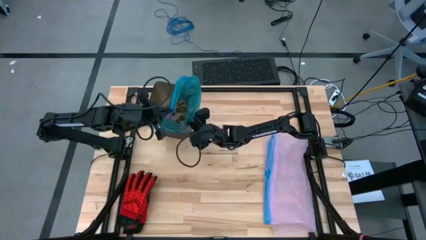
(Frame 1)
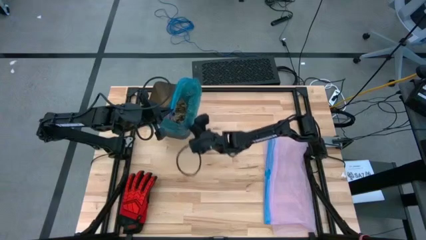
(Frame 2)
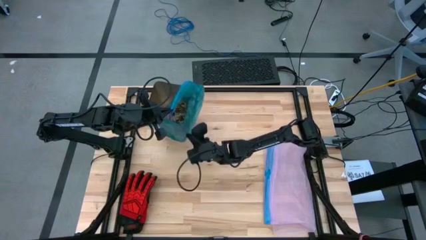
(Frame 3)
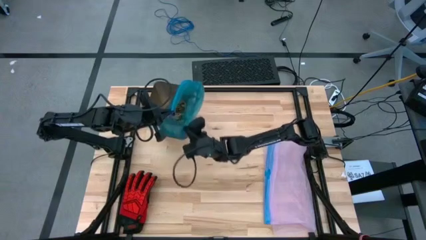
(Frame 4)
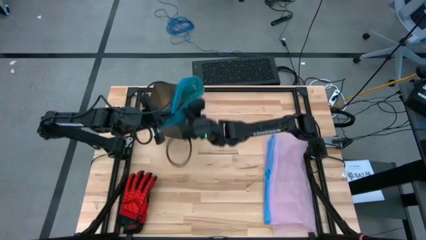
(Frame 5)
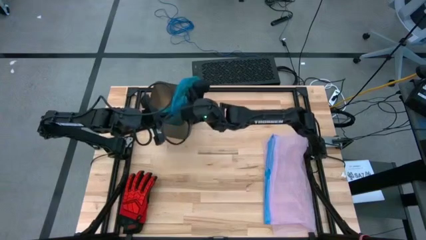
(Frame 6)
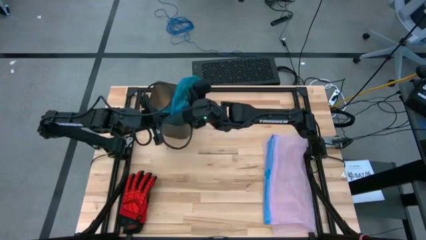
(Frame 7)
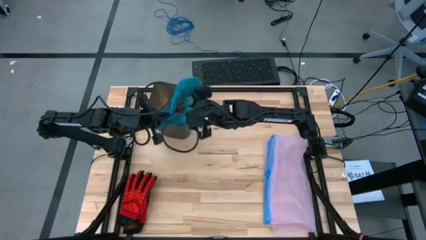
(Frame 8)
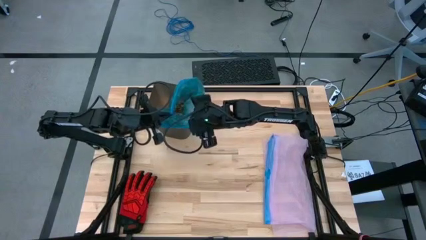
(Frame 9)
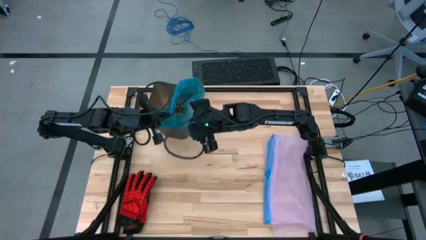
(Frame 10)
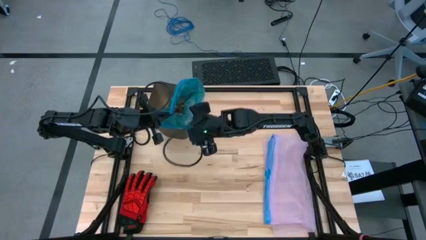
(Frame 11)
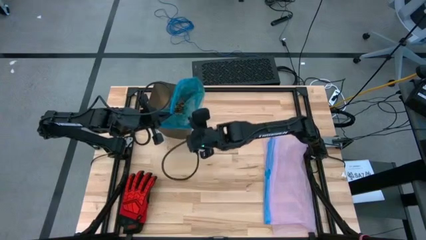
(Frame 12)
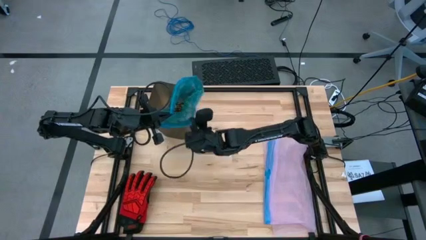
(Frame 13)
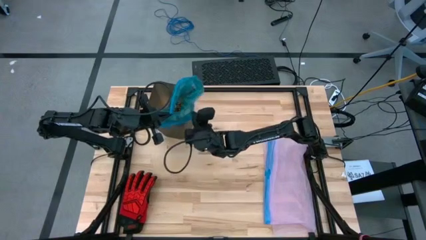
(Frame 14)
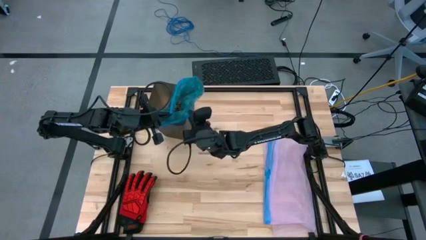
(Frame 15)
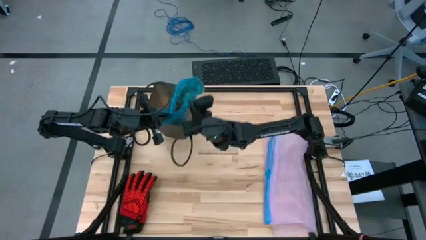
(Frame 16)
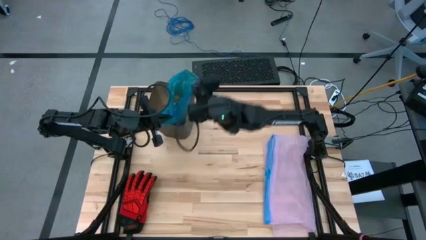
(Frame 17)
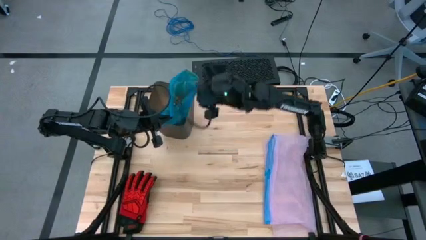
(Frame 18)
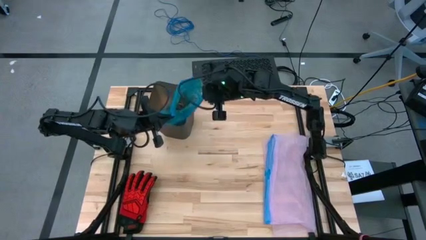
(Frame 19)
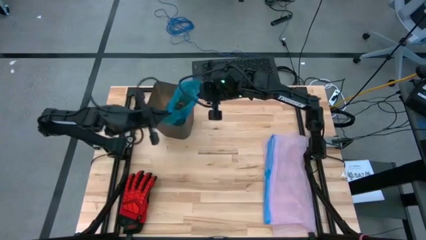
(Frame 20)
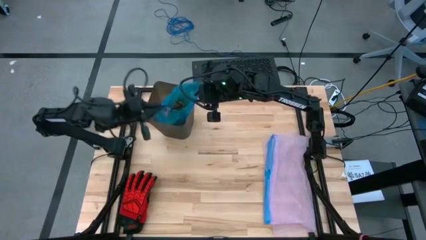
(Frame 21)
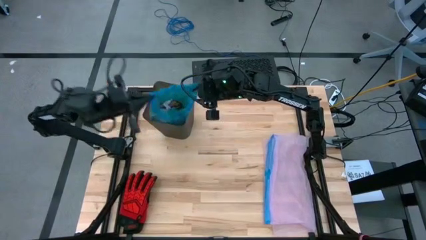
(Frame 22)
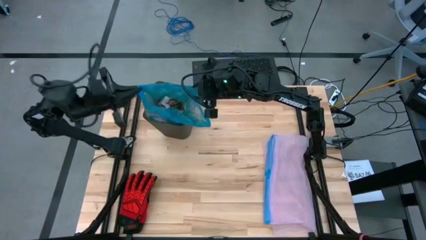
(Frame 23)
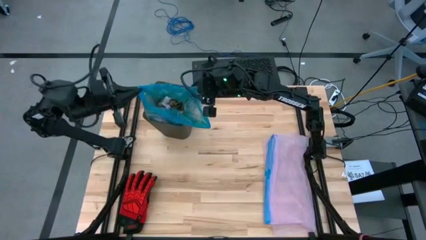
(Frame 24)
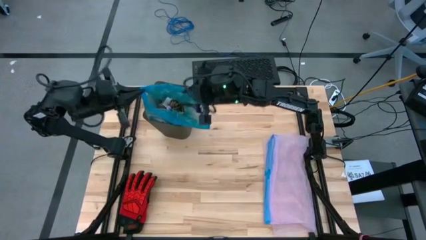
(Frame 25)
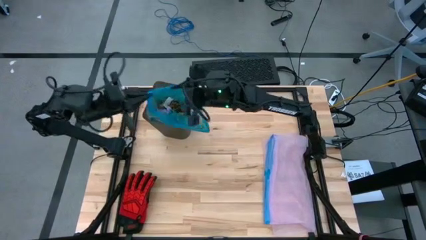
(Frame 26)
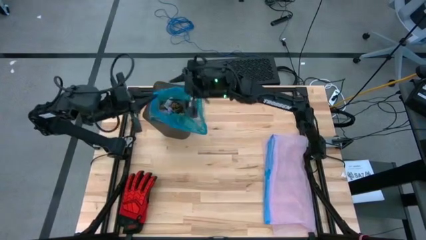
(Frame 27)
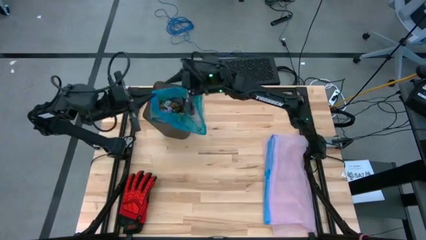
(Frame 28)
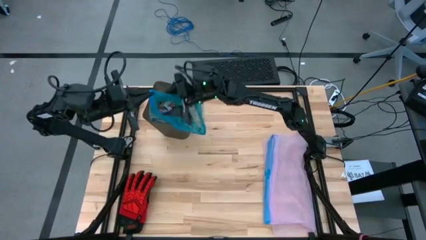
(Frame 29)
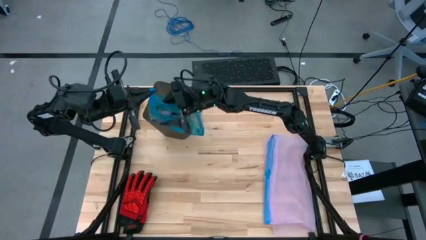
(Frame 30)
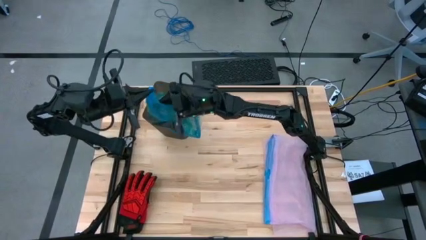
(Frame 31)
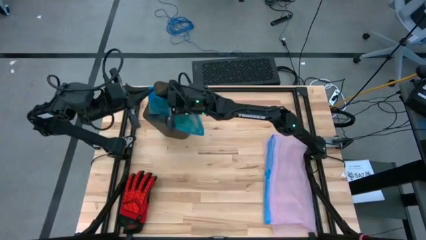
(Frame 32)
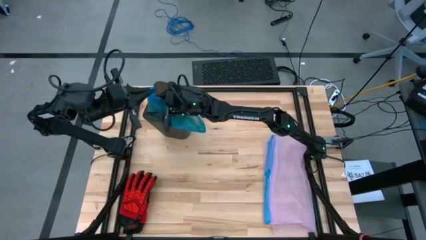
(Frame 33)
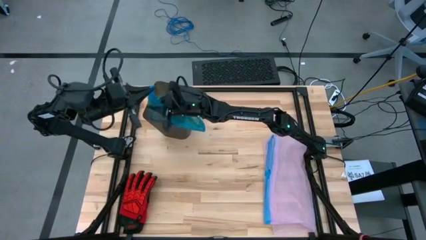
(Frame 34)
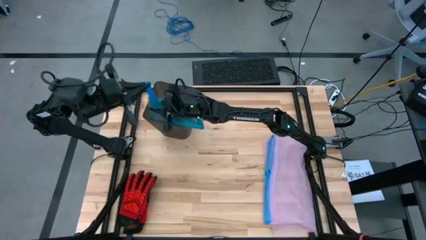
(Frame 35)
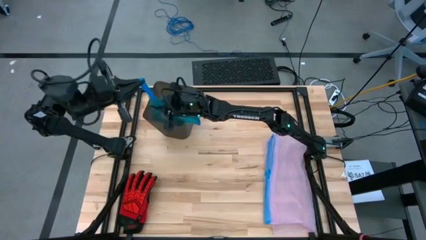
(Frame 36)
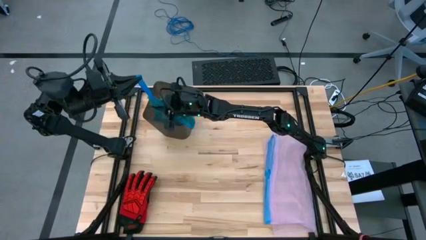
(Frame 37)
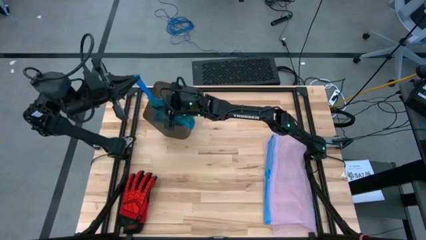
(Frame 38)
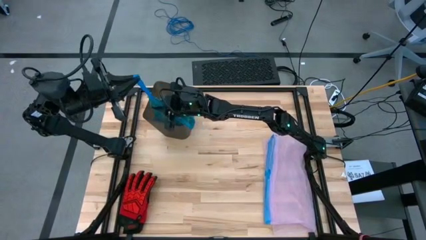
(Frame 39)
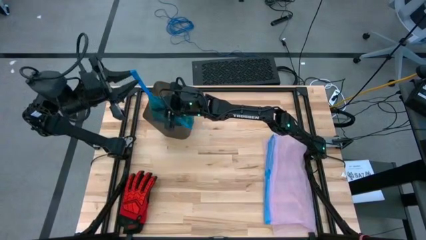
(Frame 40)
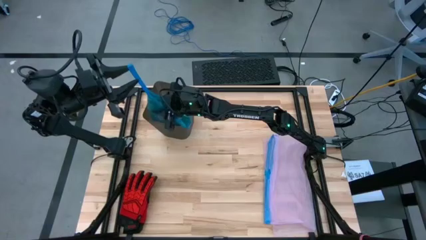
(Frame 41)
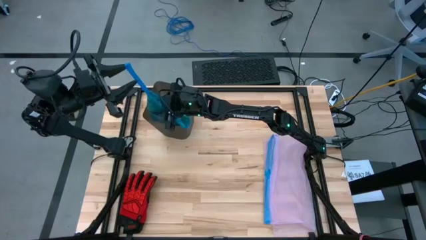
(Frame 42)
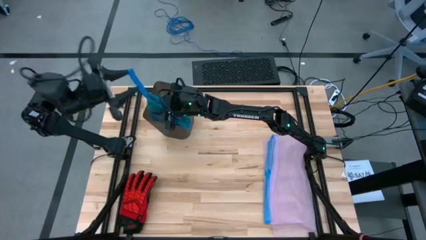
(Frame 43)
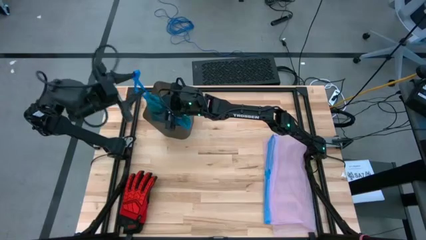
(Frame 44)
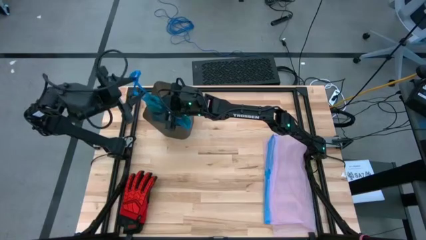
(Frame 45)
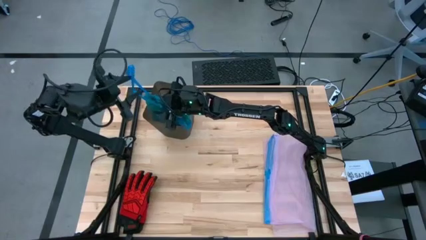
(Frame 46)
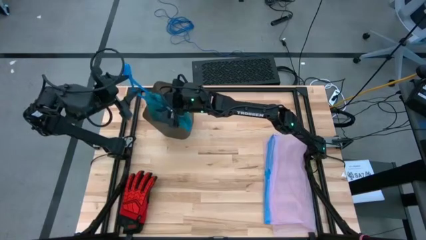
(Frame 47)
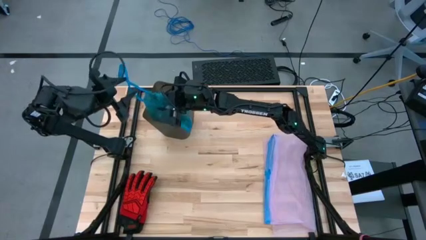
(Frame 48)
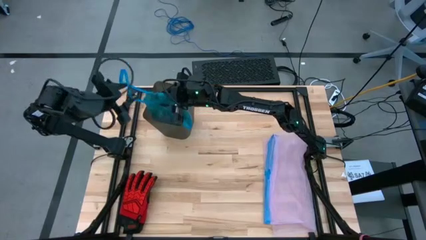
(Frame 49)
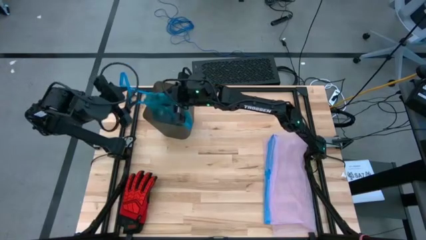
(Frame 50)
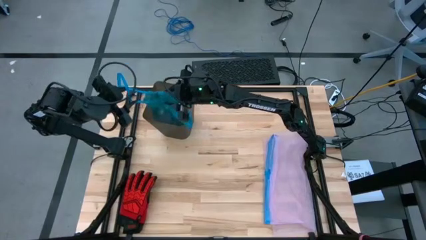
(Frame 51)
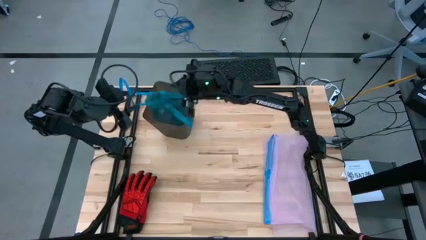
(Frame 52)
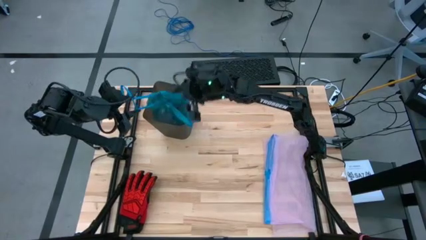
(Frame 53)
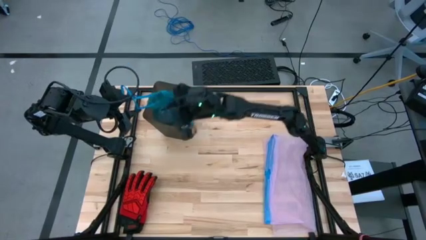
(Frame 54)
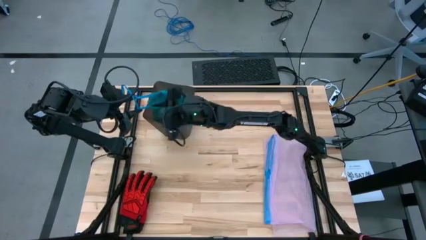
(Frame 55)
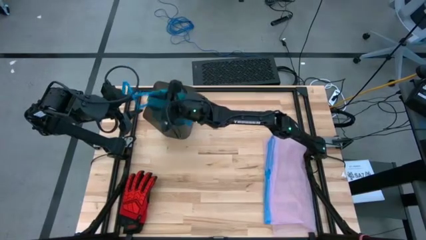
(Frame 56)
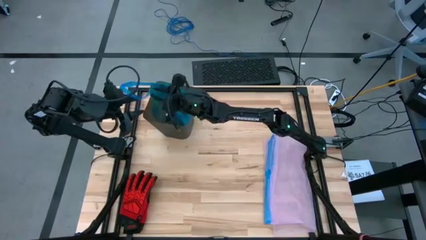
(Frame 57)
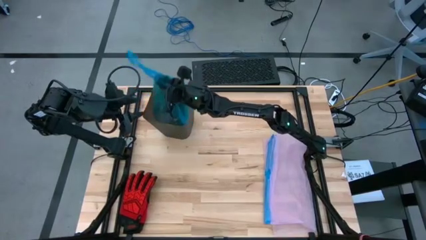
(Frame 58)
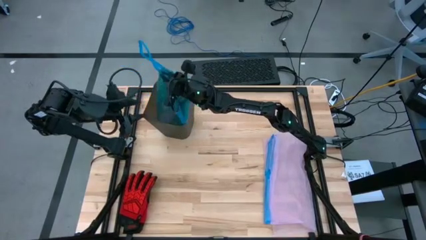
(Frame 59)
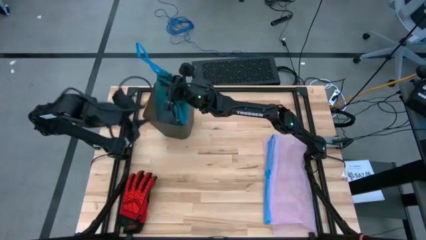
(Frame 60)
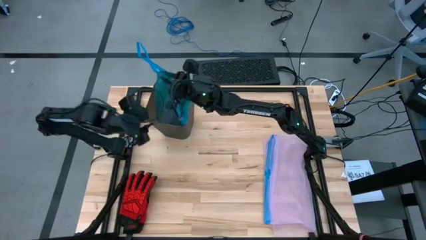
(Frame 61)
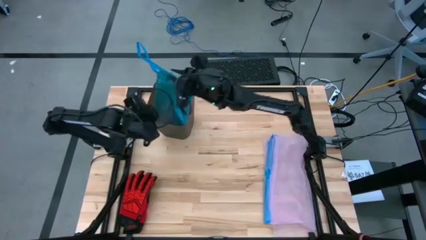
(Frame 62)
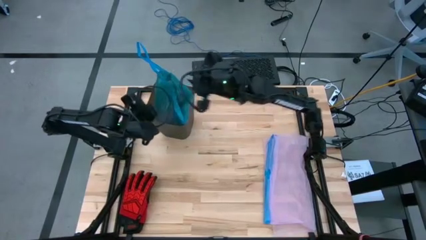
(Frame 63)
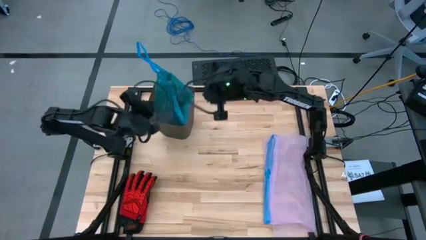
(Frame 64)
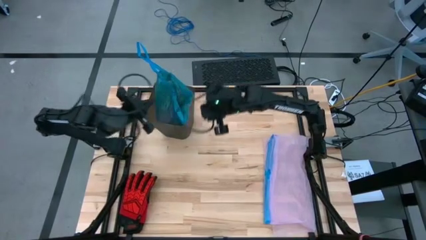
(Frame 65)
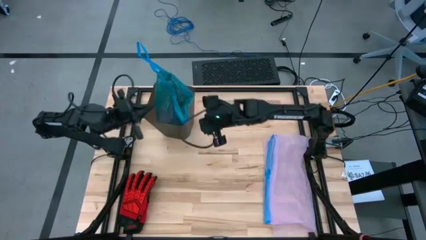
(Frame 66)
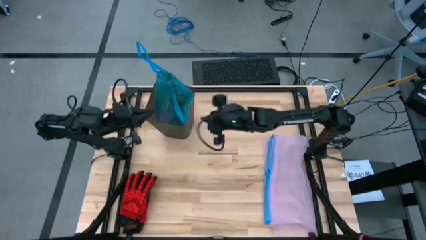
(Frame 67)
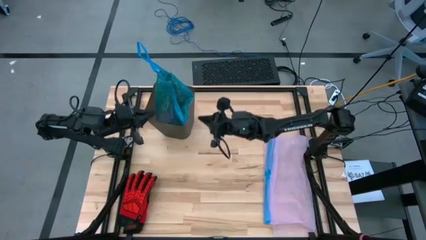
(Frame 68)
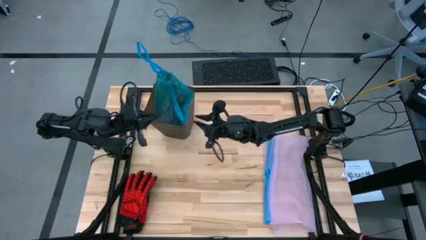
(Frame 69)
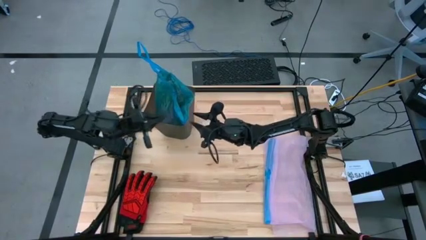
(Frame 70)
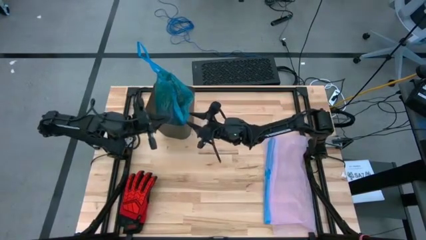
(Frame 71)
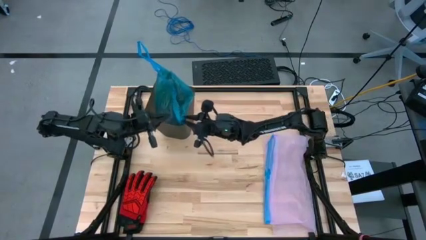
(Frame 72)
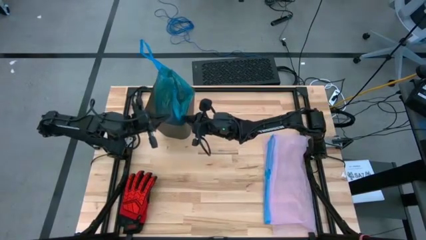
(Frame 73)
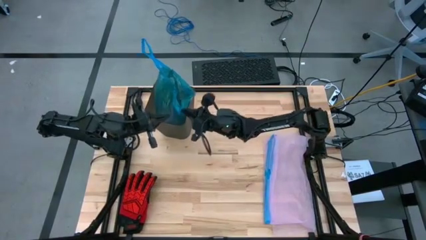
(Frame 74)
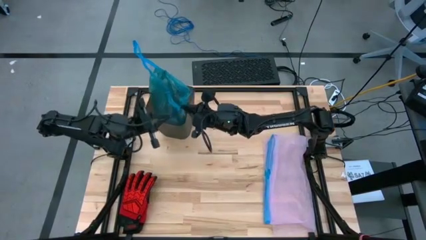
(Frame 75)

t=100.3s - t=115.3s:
Task: place trash/remove bag and relplace
Remove the trash bag from the trash bin

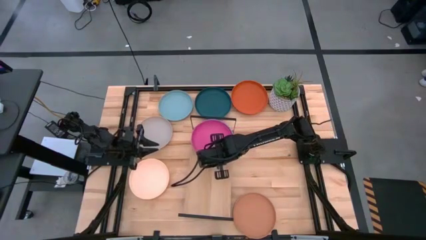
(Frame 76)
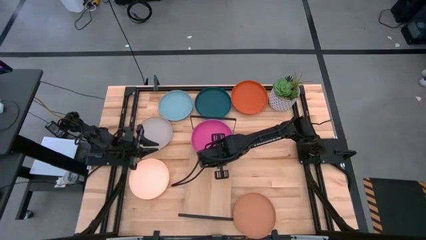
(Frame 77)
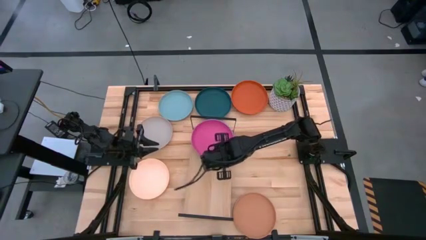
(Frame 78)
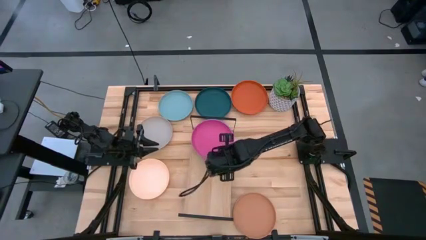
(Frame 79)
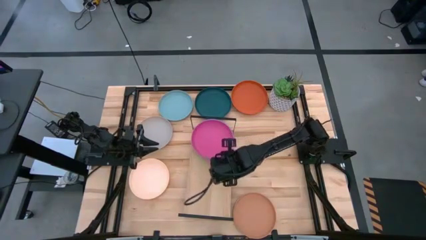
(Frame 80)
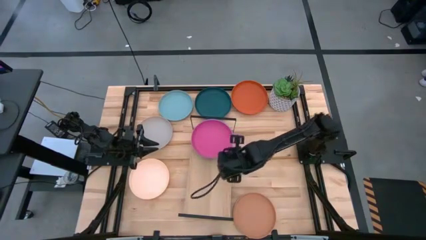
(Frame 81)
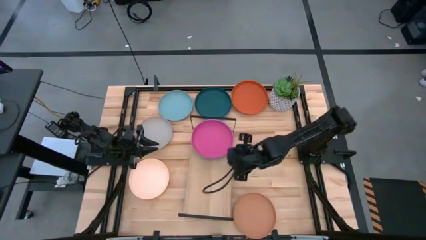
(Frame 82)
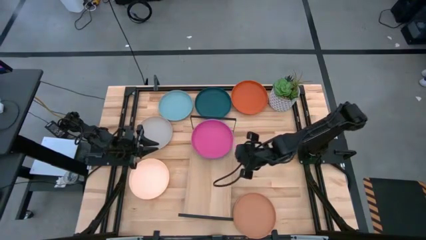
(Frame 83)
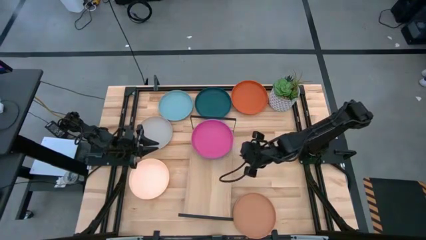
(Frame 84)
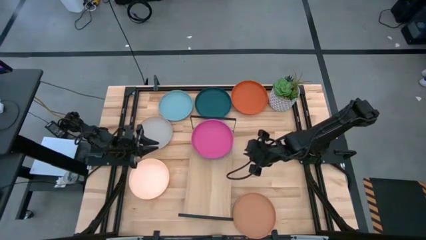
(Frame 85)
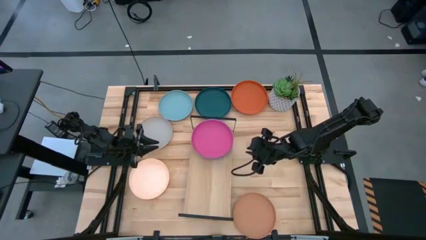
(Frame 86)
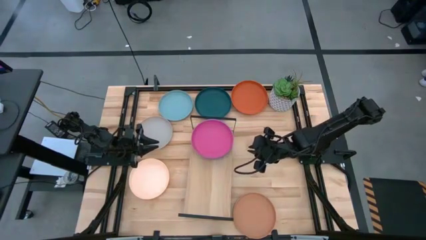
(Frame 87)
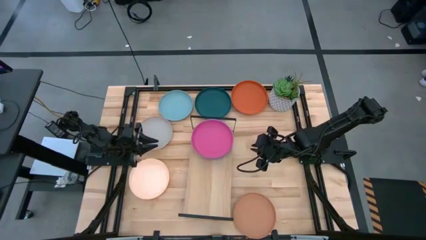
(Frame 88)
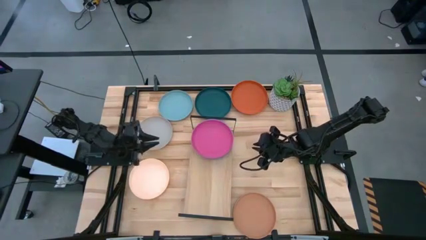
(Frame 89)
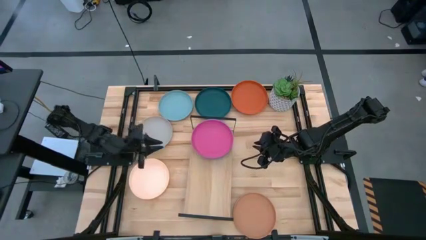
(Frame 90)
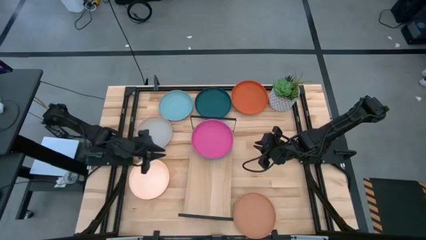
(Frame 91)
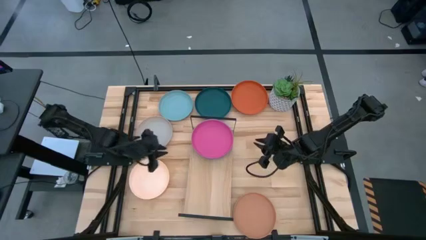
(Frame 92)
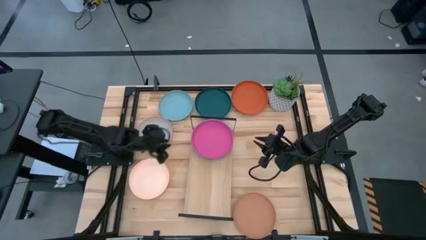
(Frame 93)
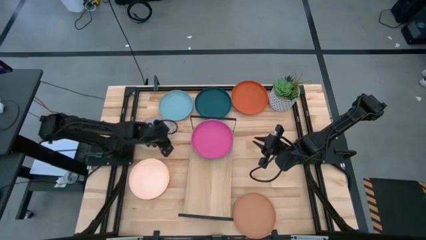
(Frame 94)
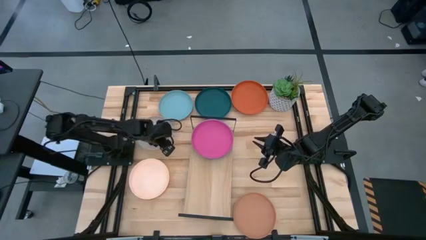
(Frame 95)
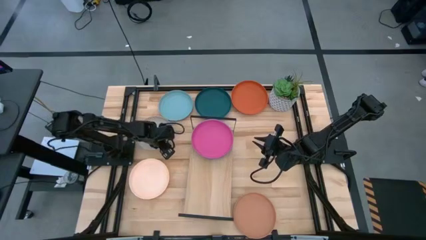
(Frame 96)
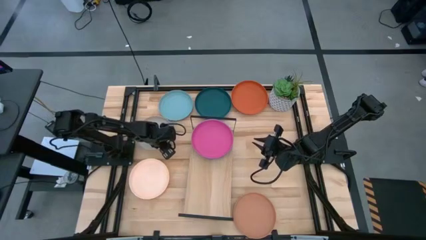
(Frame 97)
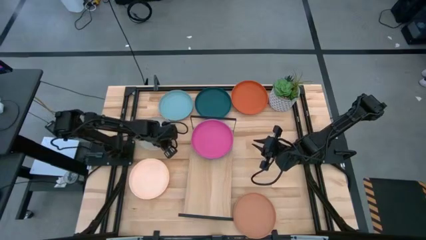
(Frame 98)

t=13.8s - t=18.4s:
Task: Place and stack plates onto a shelf
Put the gray plate on the shelf
